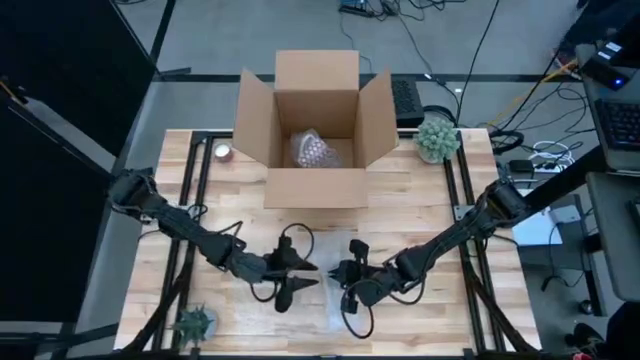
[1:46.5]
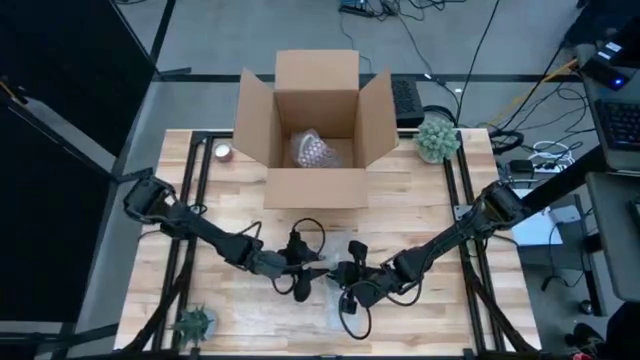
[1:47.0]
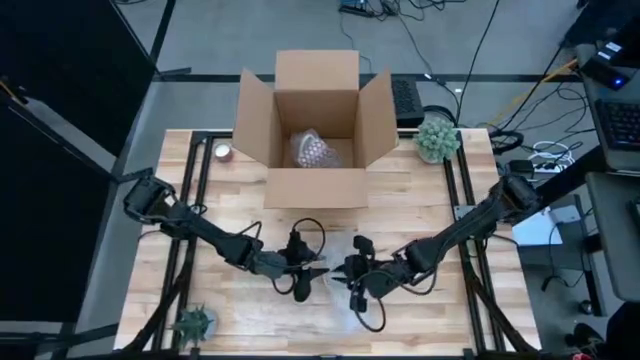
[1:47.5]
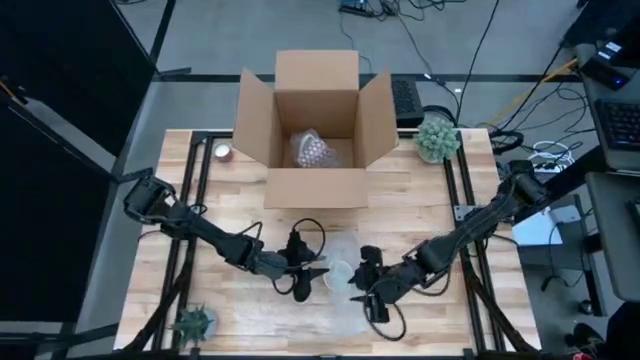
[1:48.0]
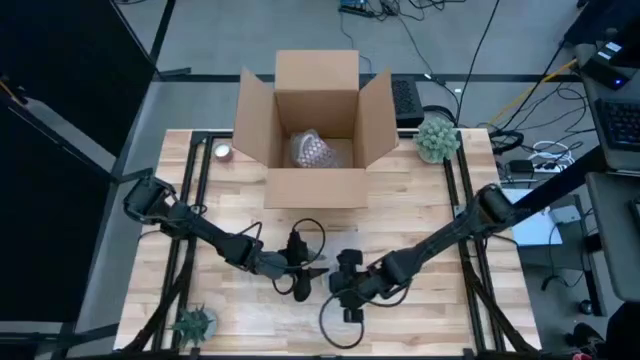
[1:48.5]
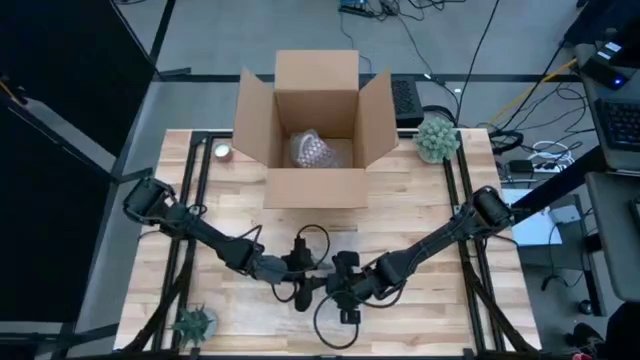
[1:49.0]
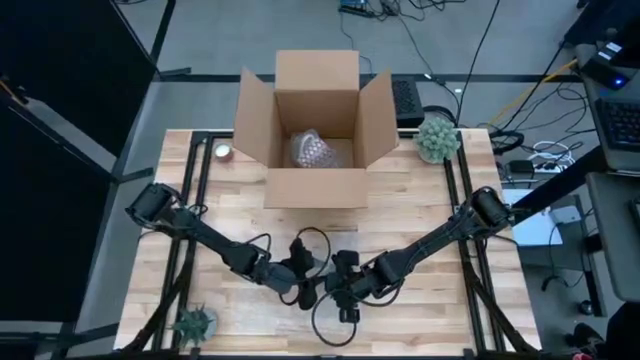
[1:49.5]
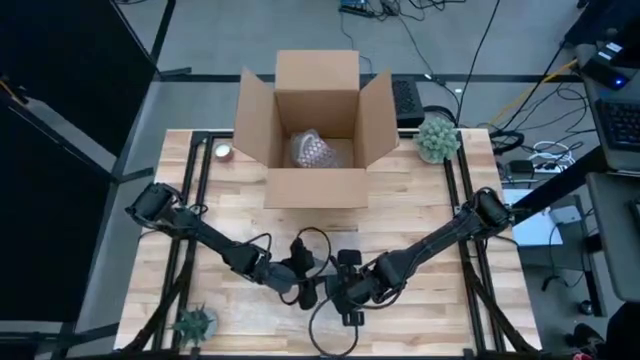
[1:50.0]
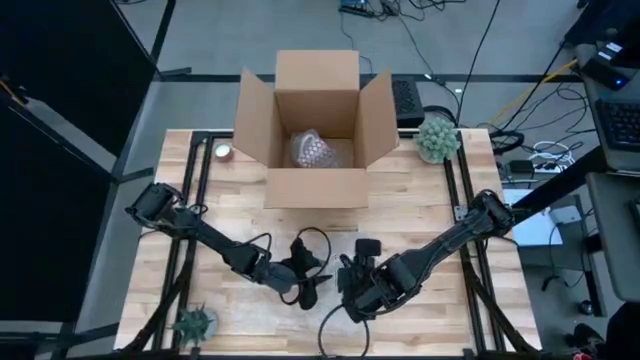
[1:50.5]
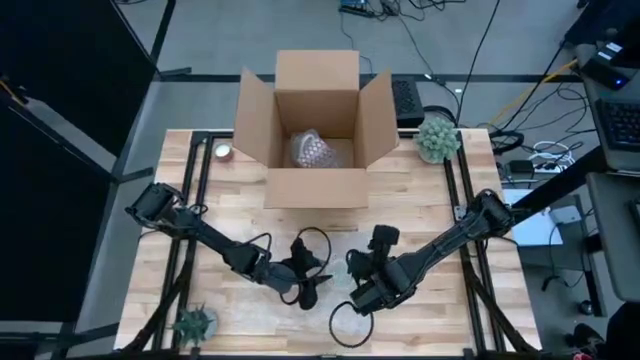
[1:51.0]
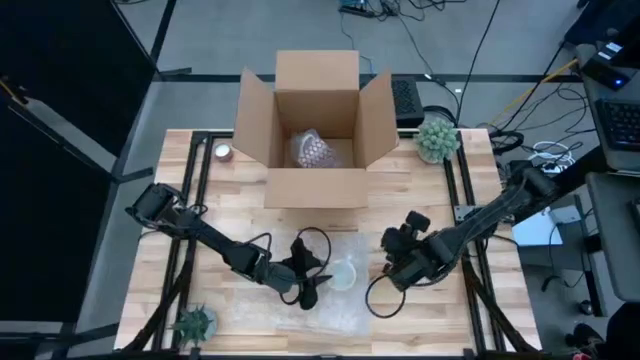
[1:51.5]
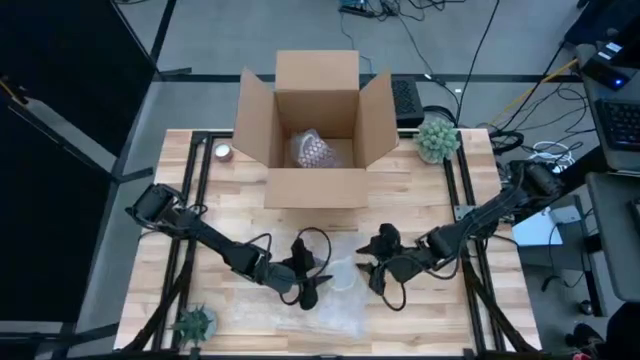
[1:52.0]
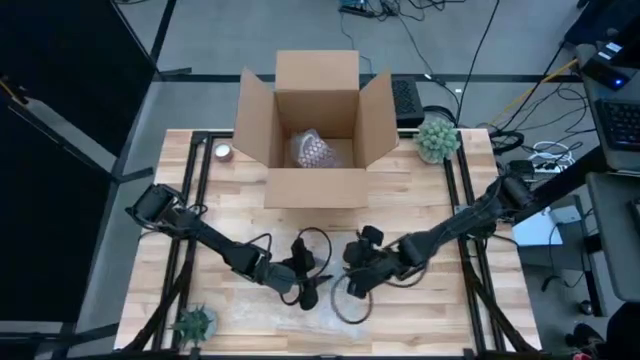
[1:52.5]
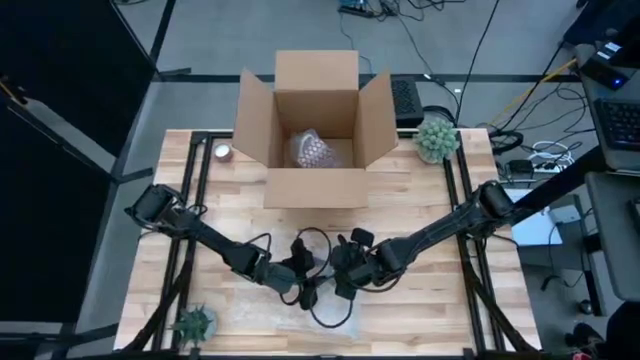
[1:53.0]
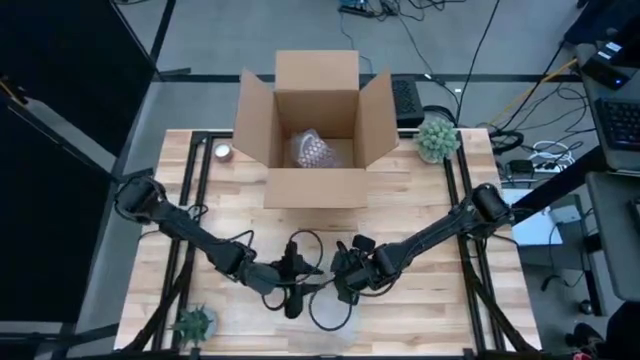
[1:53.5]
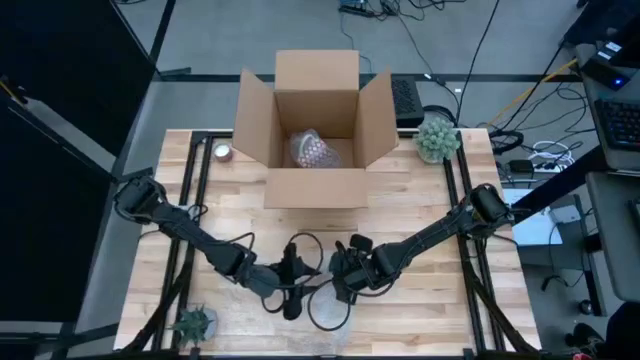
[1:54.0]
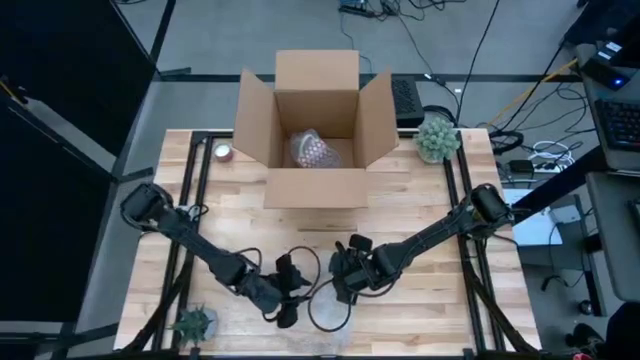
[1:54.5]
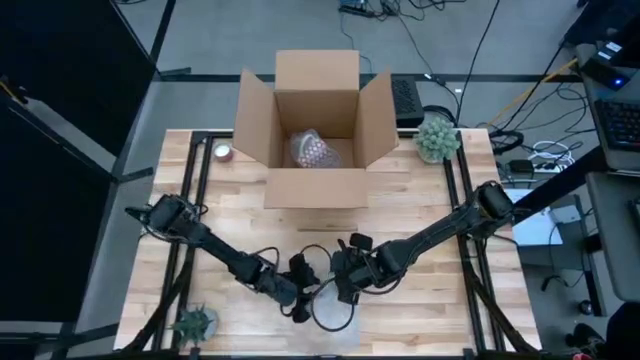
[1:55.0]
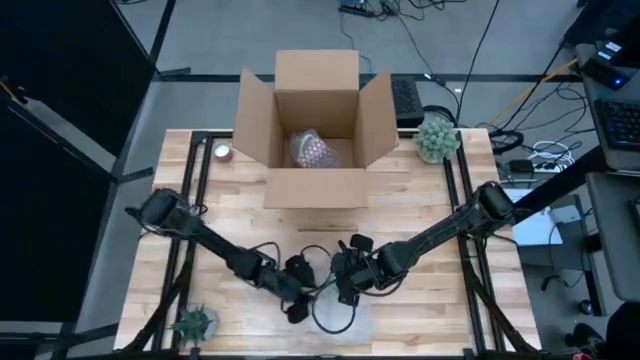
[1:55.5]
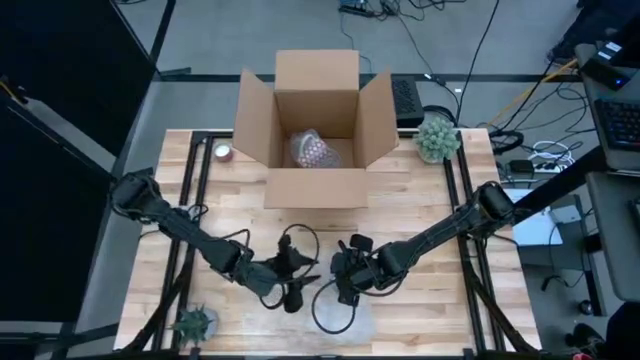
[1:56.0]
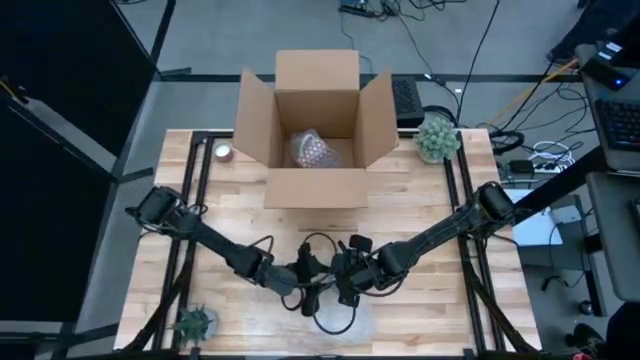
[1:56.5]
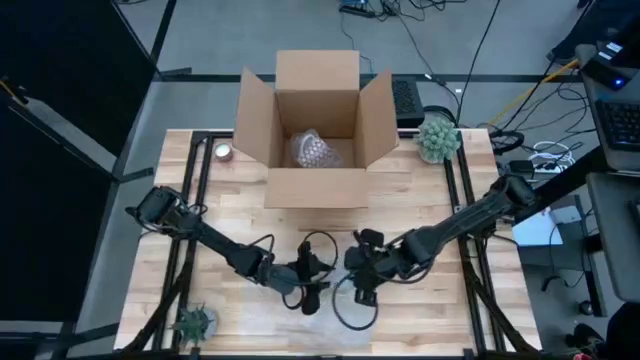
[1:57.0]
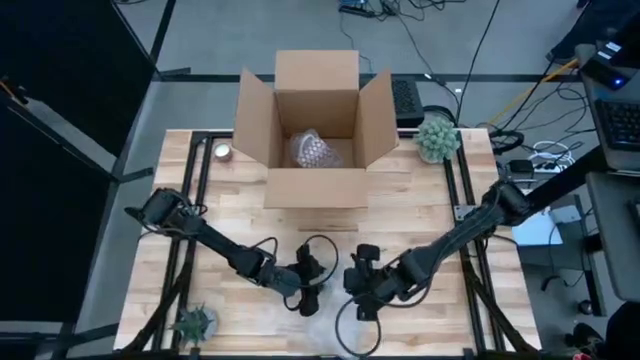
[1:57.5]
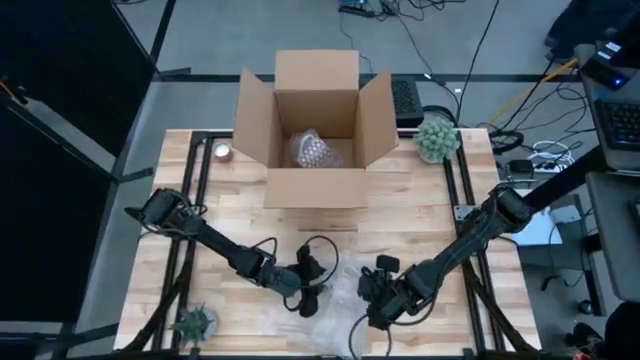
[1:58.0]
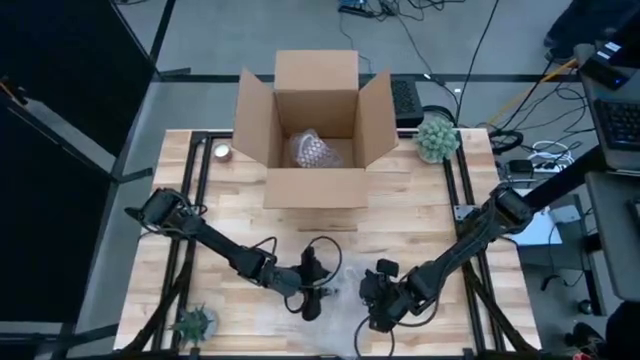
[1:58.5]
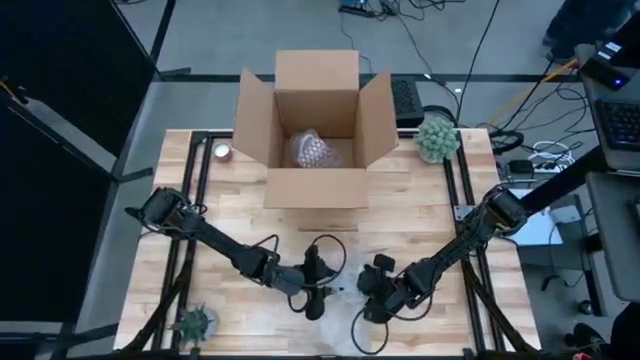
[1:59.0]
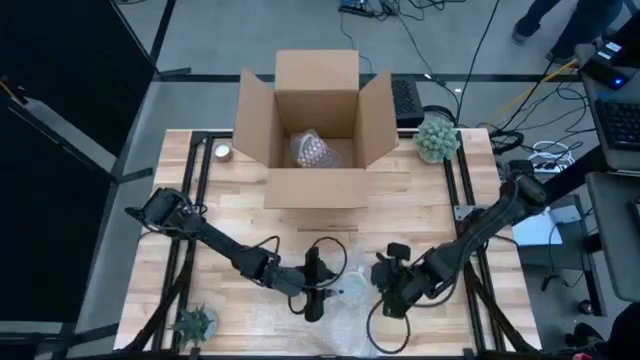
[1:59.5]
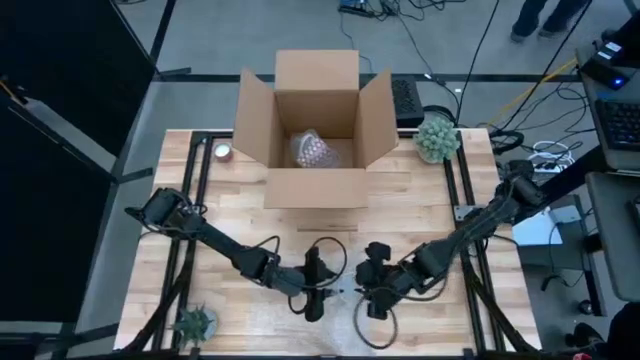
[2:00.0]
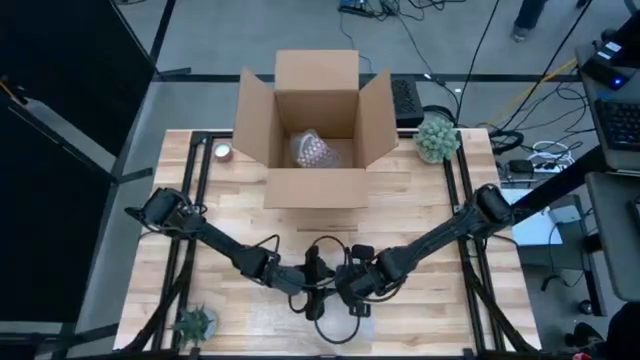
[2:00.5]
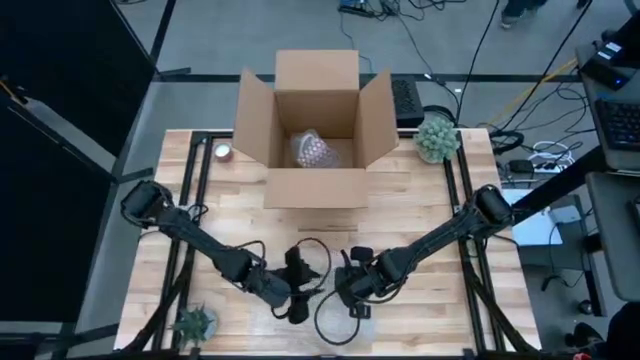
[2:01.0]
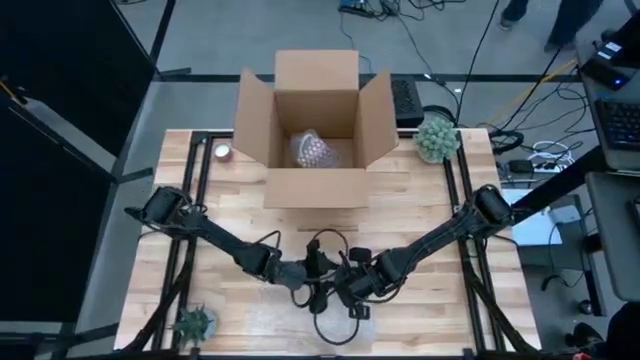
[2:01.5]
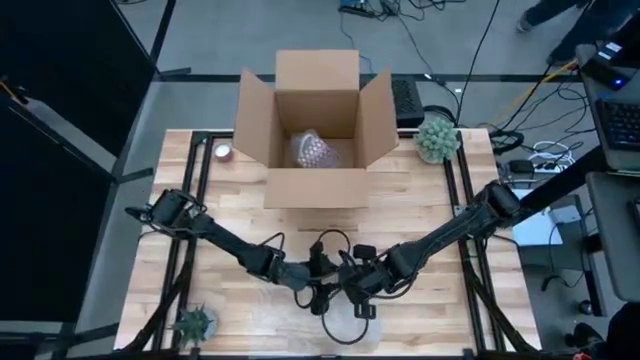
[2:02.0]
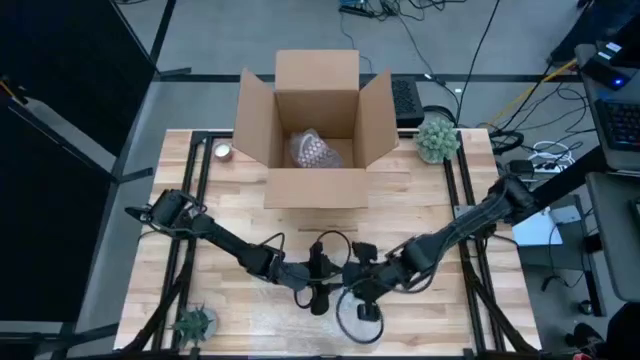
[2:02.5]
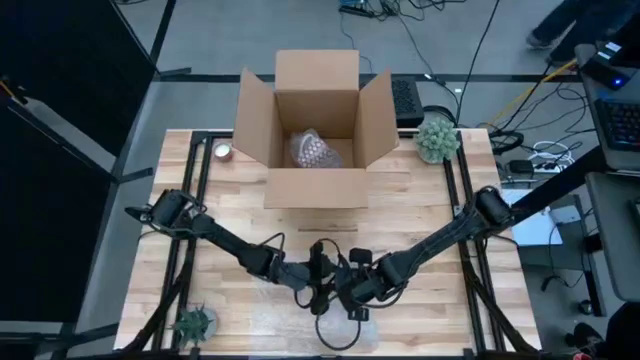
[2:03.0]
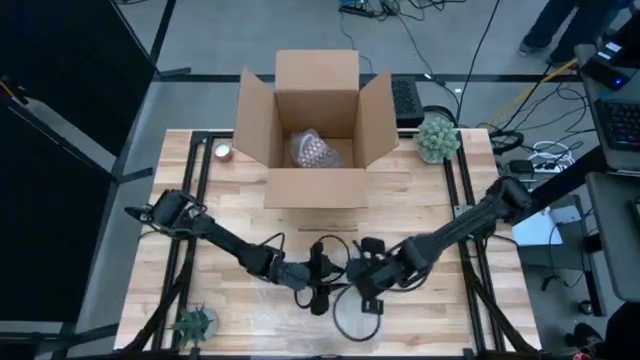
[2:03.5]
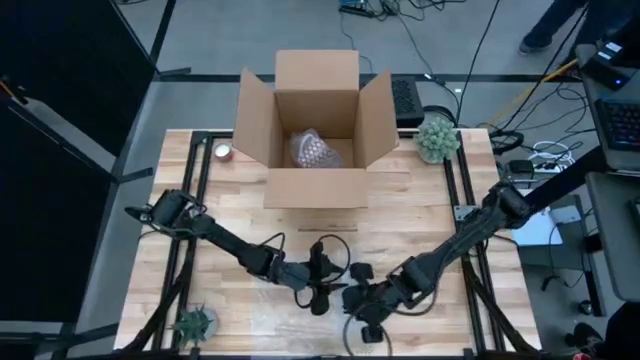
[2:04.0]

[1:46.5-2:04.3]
Task: wrap mug
Wrap the yellow mug with the bubble wrap

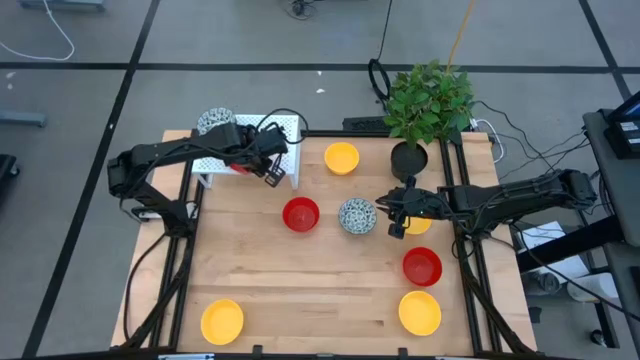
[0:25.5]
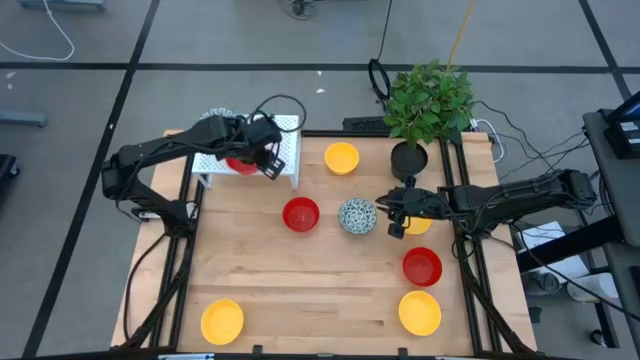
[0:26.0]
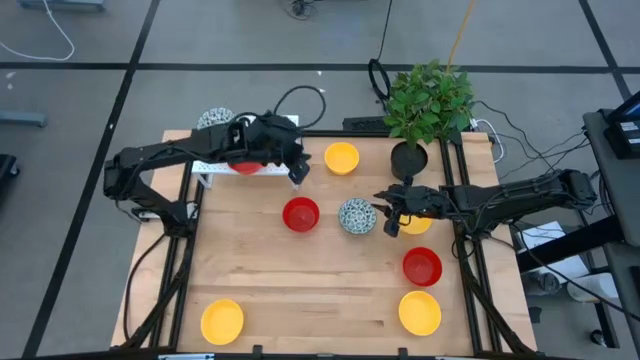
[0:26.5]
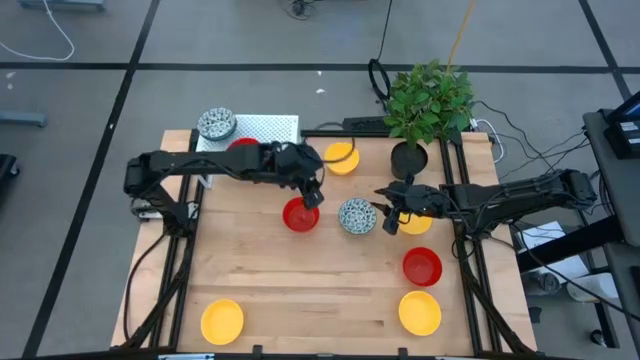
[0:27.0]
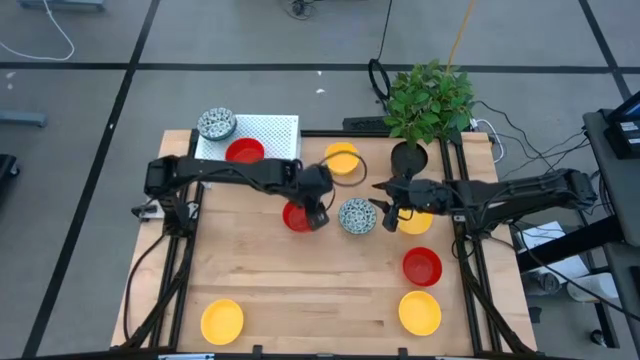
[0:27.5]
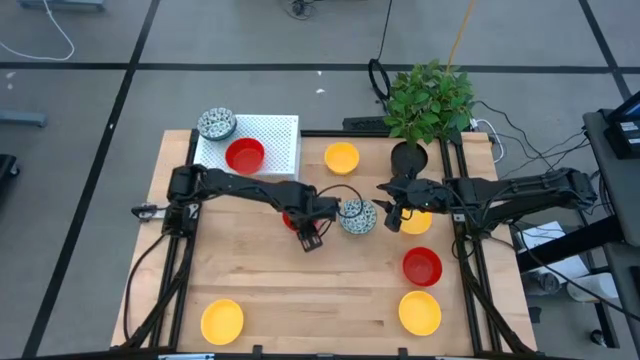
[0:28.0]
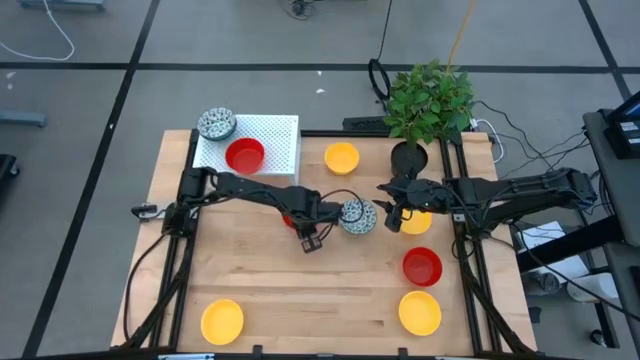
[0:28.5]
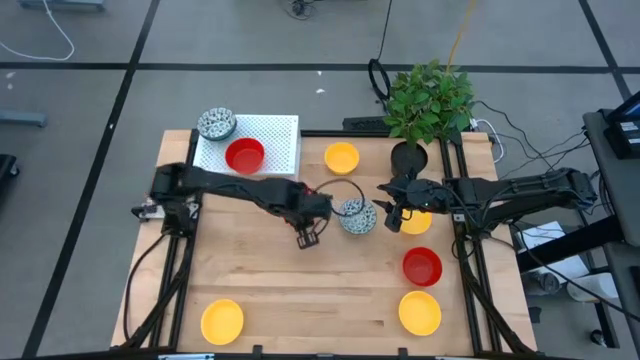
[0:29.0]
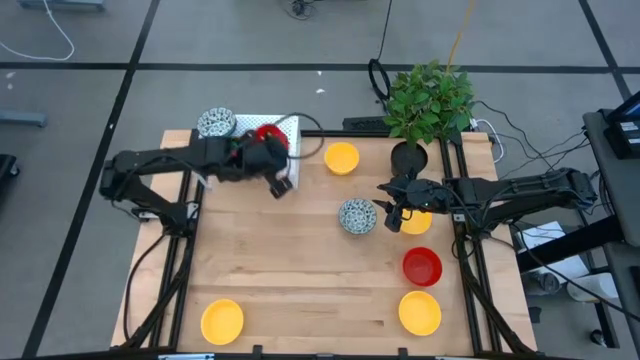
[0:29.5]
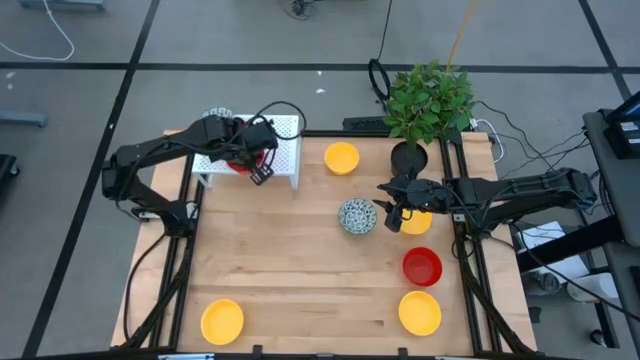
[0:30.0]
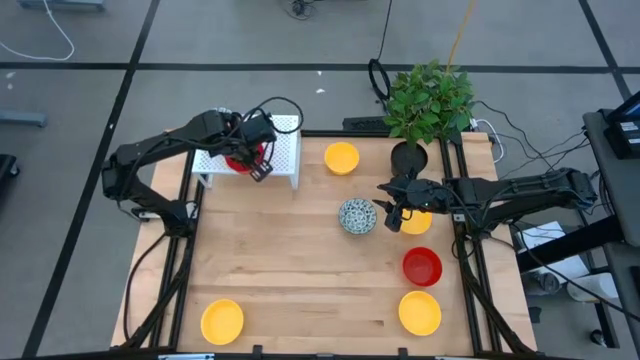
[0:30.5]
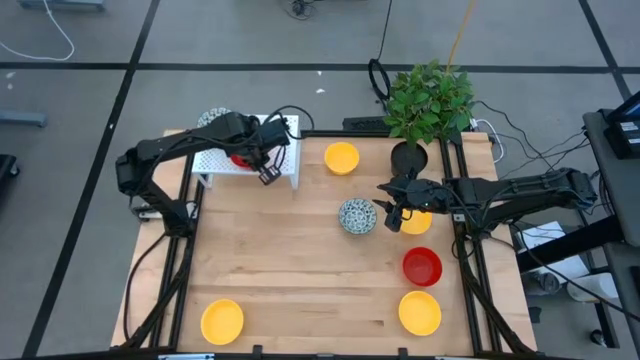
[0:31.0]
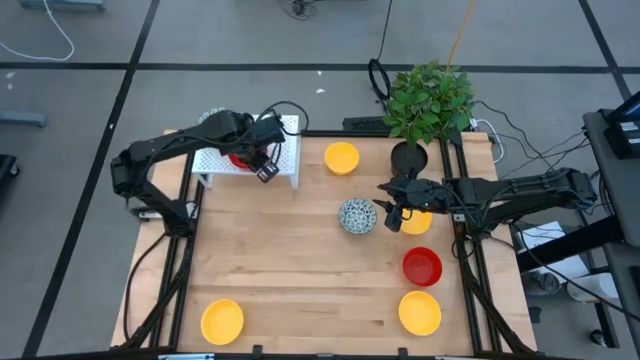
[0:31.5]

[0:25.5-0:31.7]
Task: Pick & Place Mini bowls
Stack the top red bowl on top of the red bowl on the shelf
